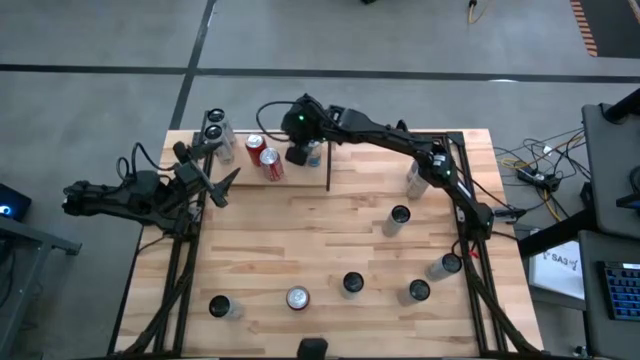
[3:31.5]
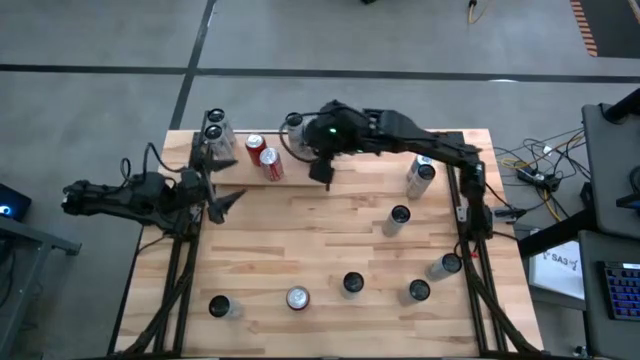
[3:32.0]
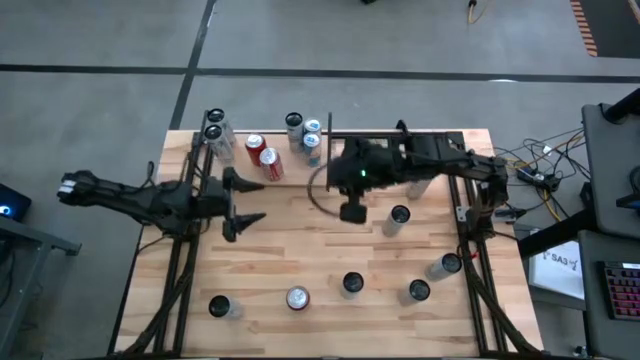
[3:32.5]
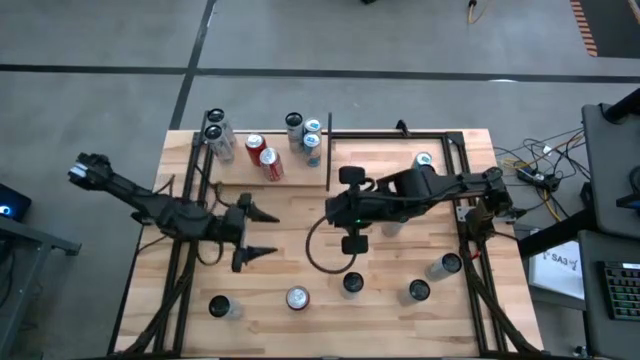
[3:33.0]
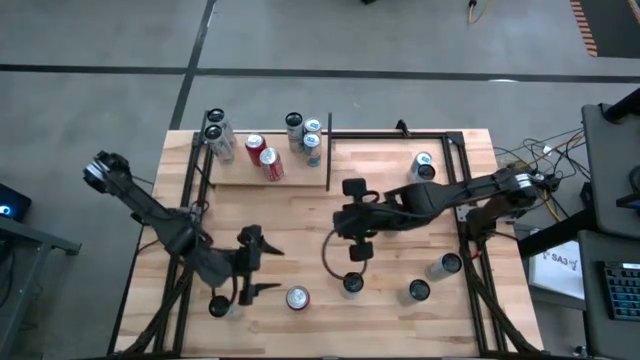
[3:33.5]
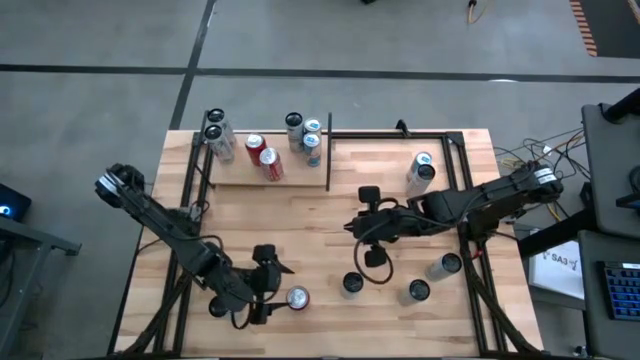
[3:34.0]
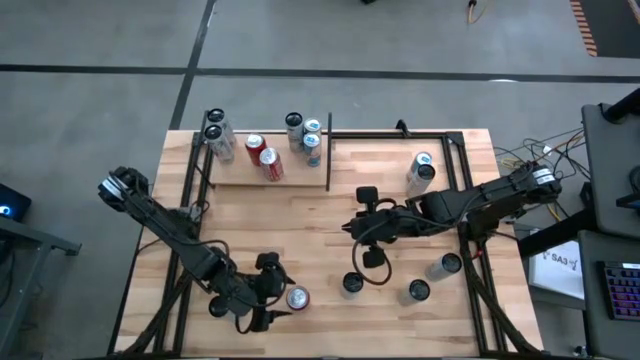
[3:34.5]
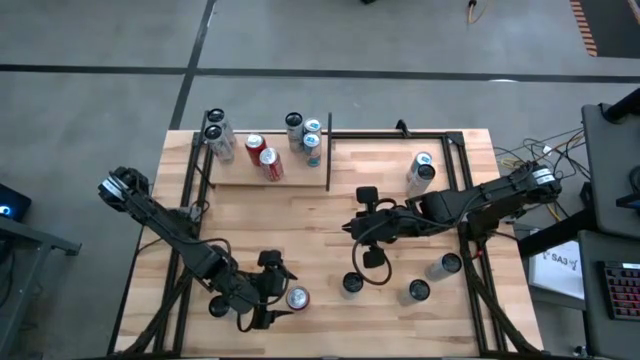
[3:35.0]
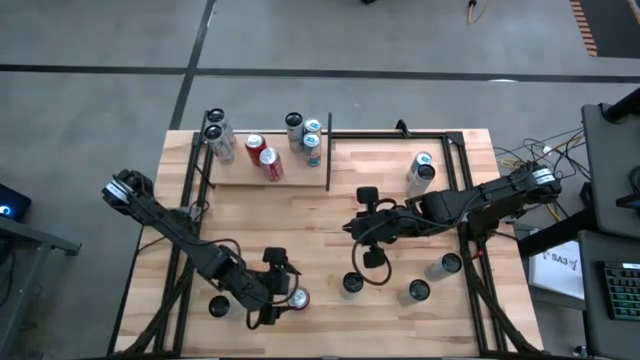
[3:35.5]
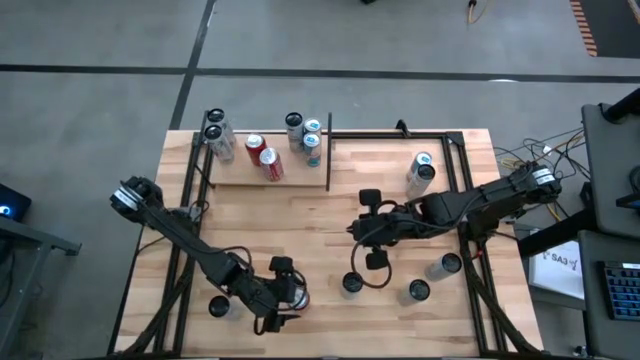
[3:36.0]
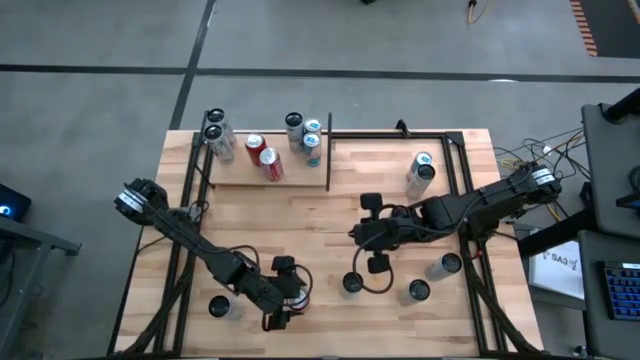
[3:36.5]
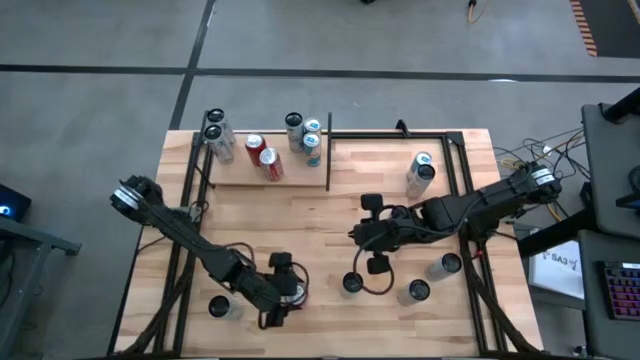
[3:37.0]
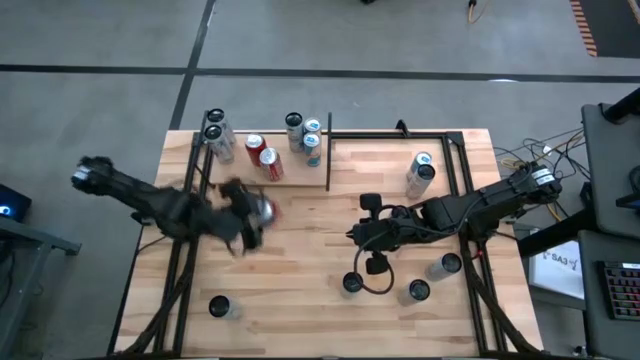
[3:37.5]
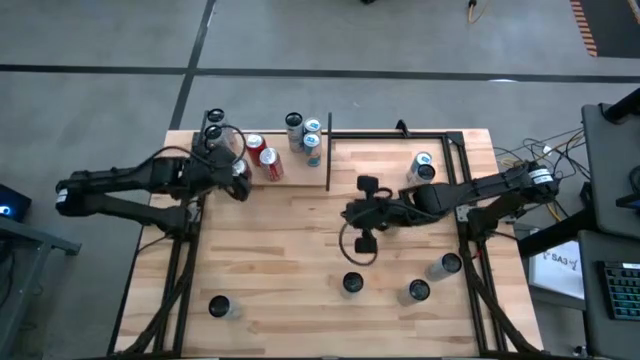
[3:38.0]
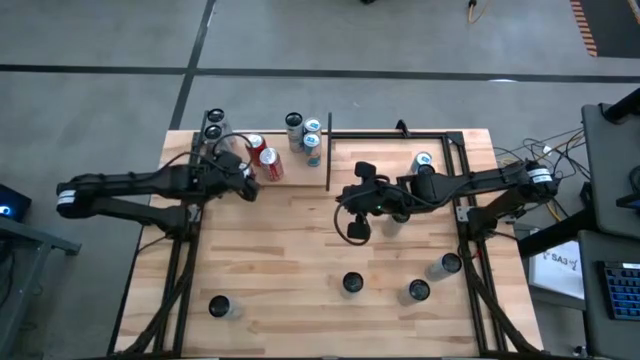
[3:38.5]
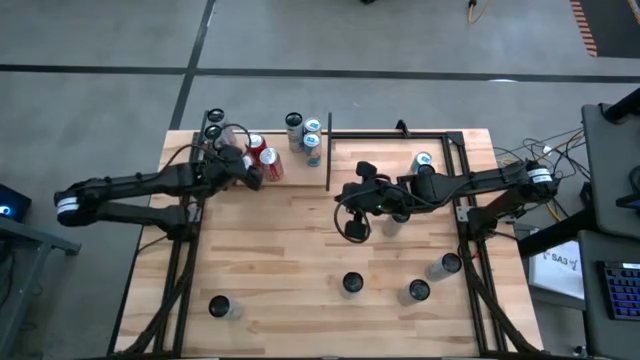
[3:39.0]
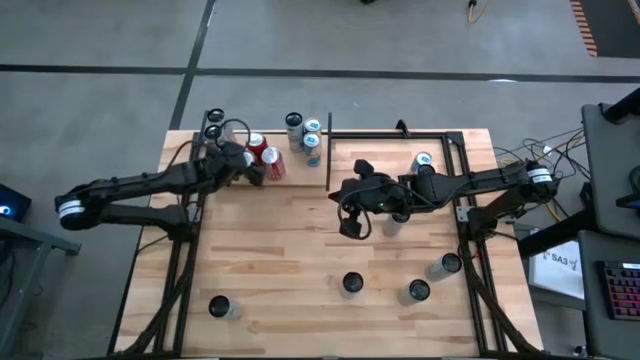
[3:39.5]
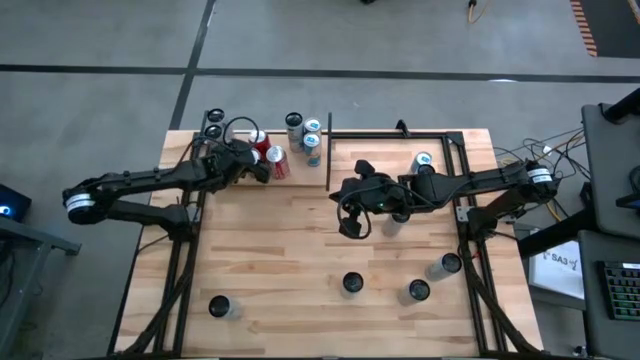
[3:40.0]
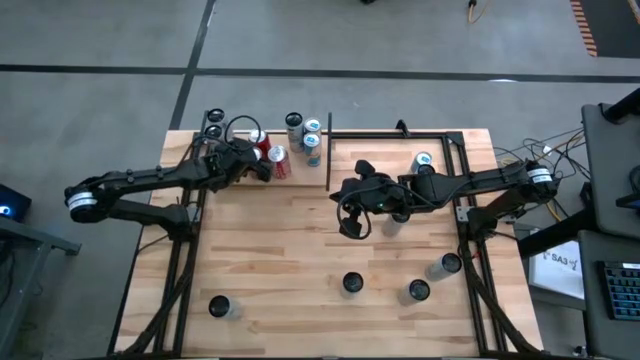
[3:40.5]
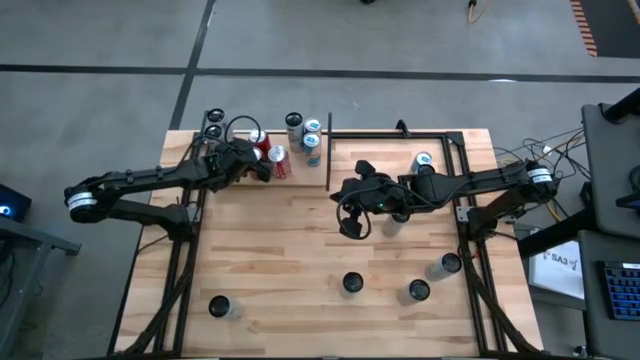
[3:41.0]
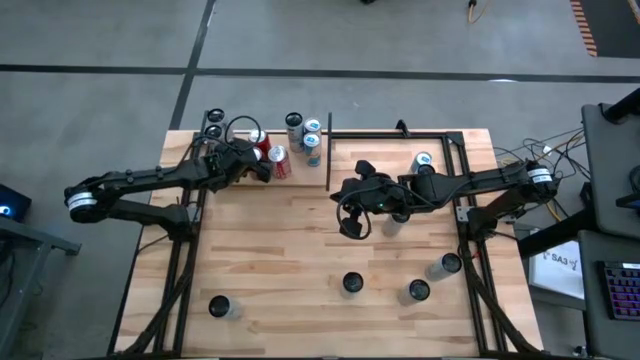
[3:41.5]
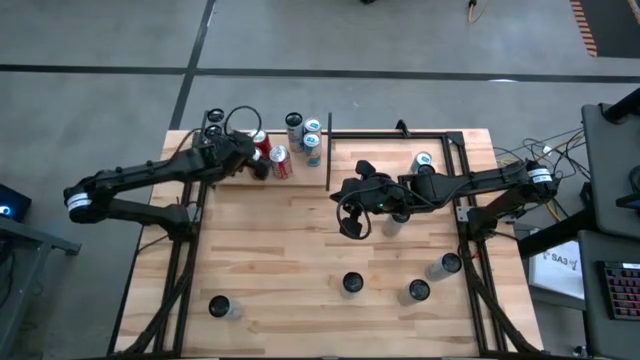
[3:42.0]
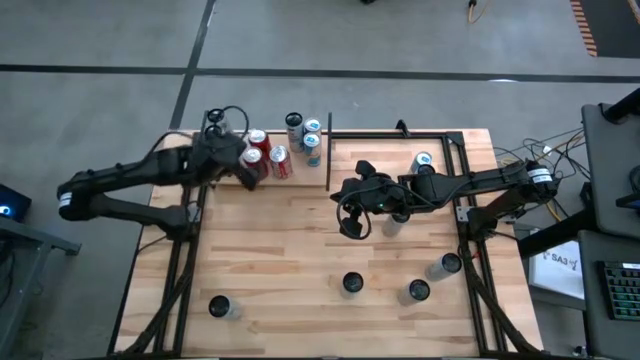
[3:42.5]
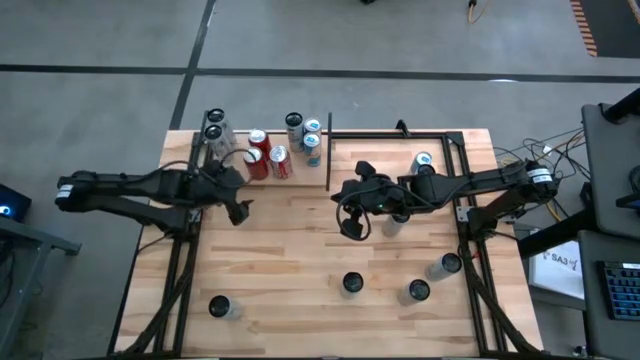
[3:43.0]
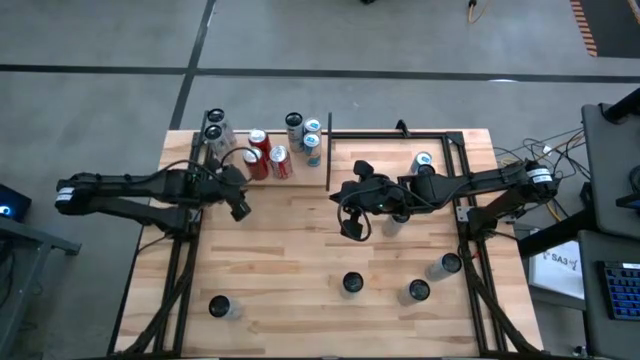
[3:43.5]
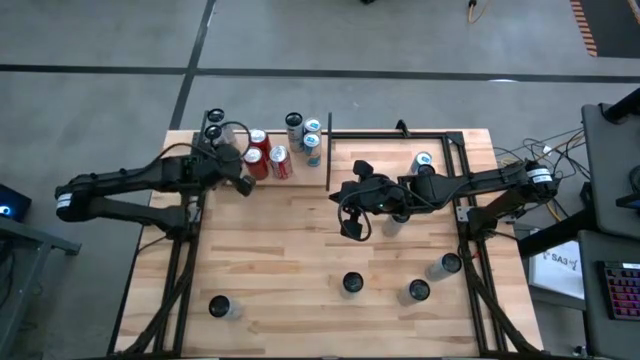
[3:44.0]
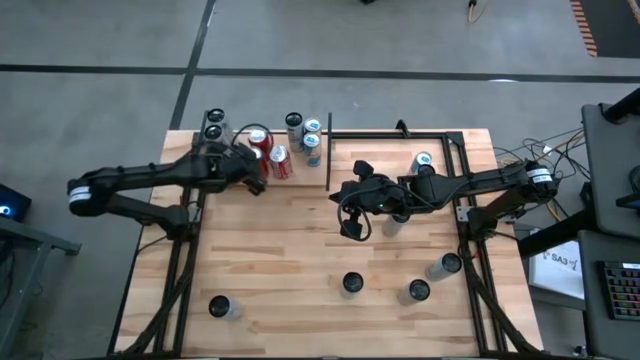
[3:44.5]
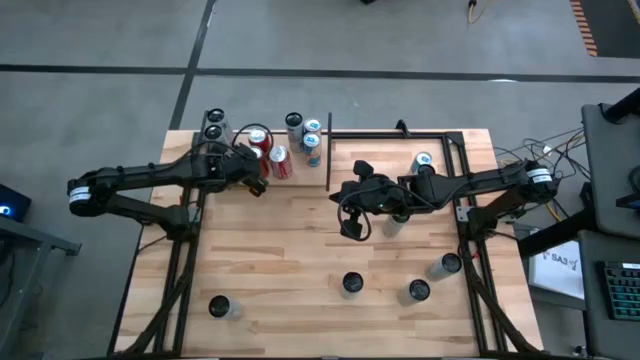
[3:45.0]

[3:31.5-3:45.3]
Task: Place canned beverage on shelf
Put the red and black soda can on the shelf aligned with the other red and black soda can

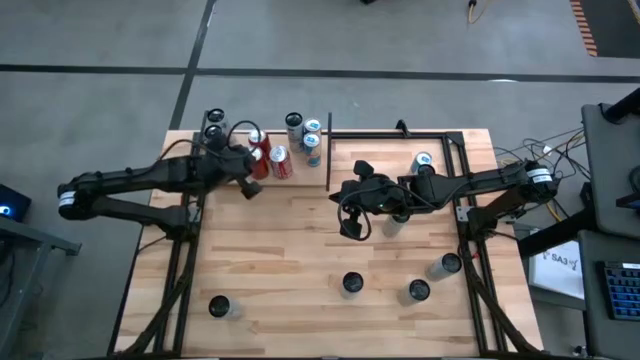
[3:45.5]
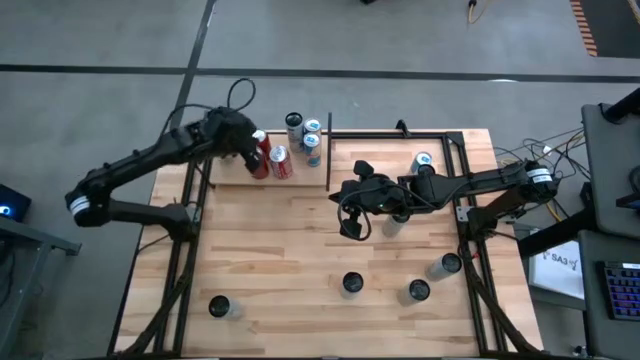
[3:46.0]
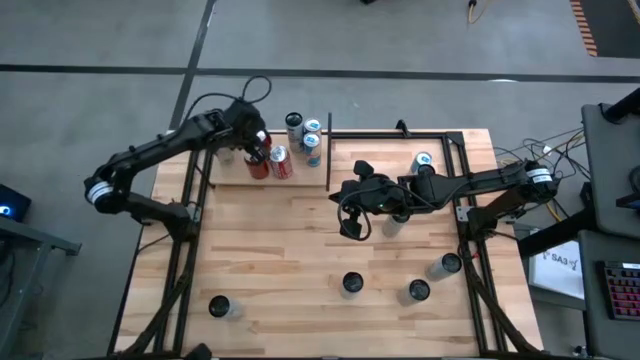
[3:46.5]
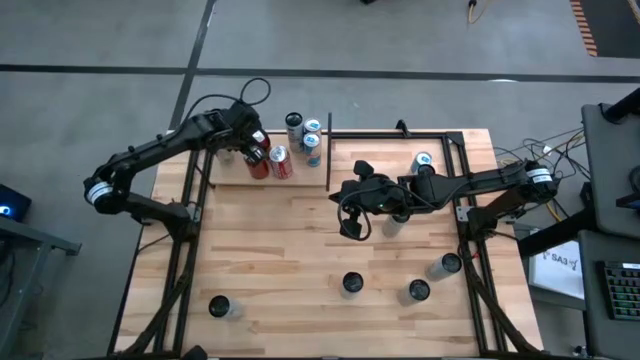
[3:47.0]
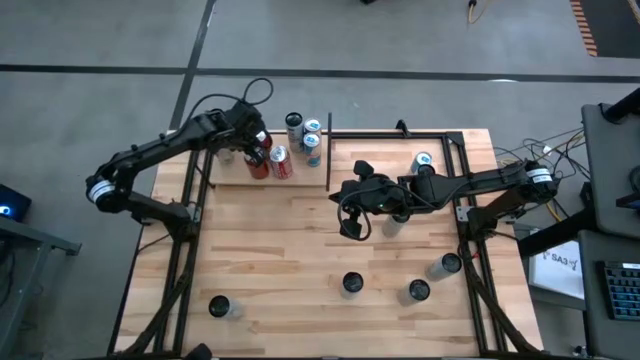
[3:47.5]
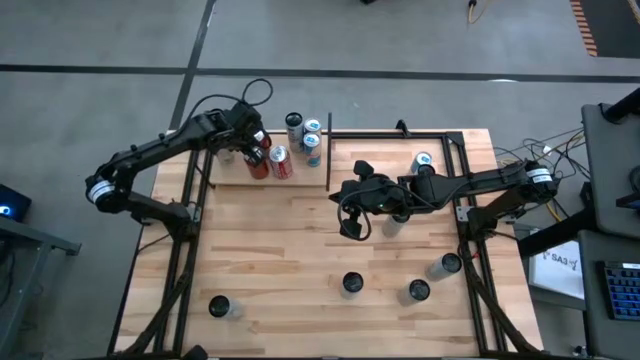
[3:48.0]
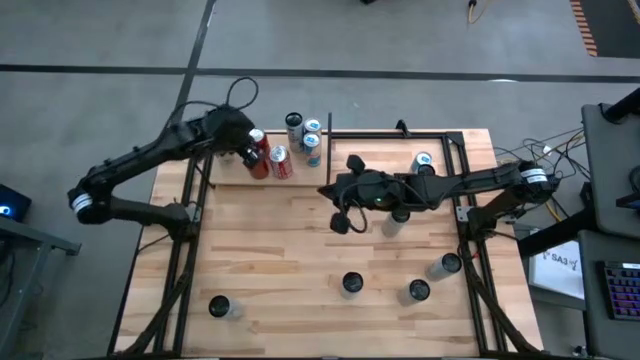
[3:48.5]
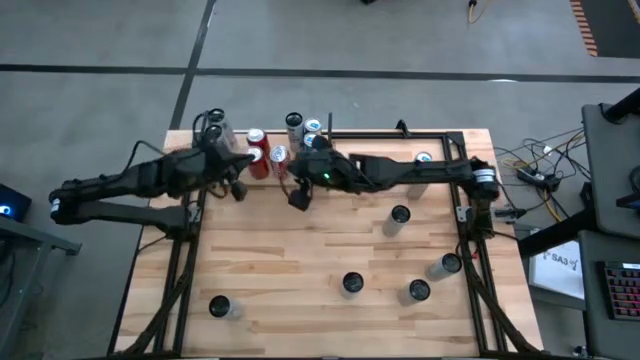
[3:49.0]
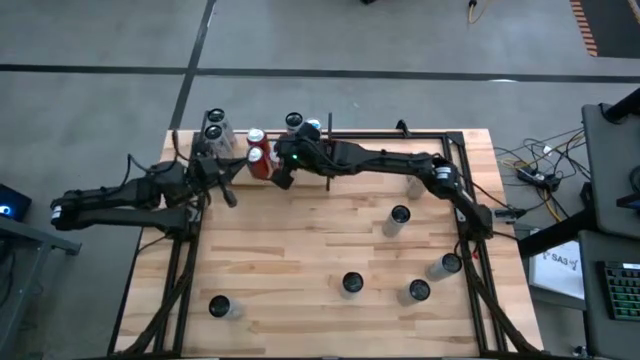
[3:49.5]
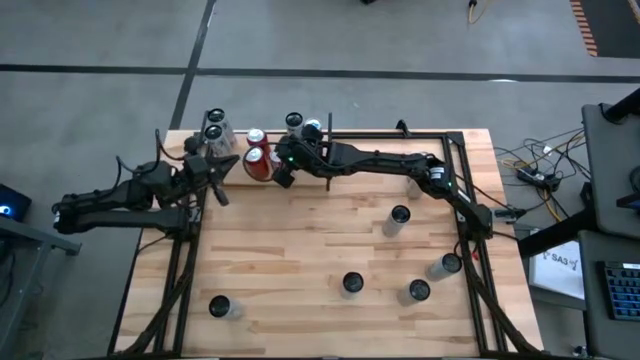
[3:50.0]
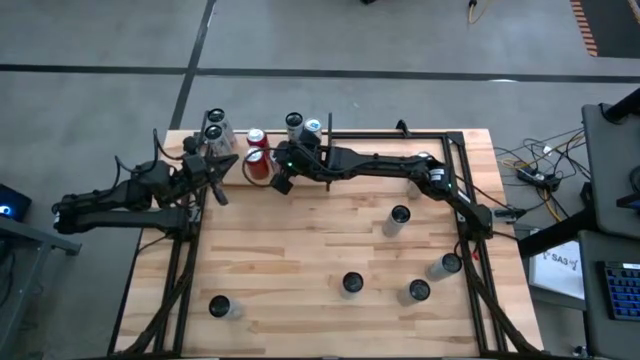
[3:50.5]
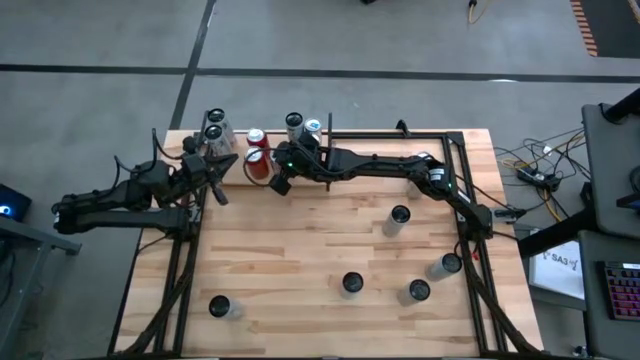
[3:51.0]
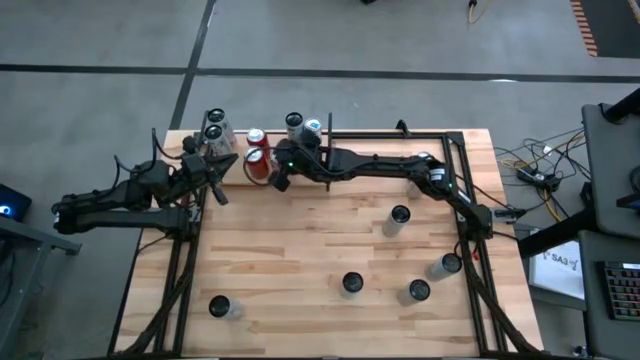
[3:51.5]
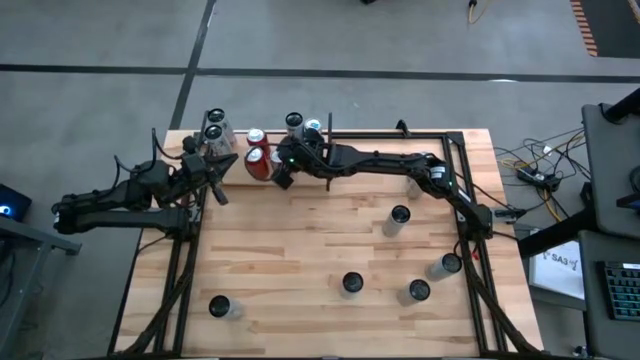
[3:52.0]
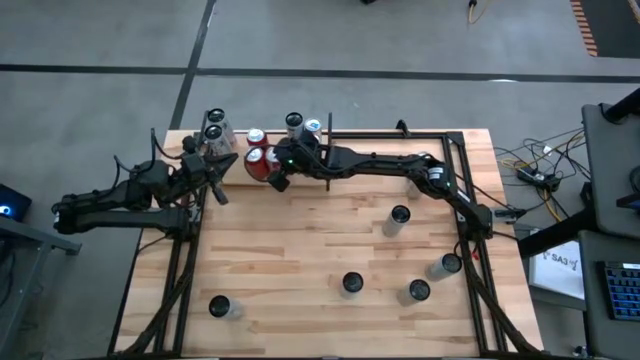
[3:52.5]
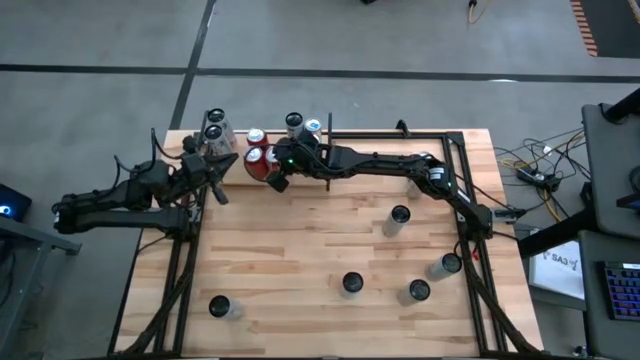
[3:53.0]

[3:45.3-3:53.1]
Adjust the soda cans on the shelf
